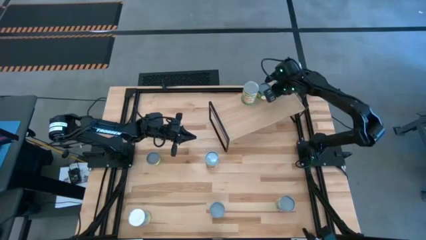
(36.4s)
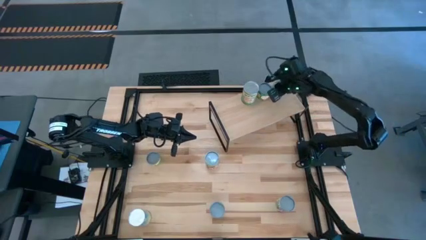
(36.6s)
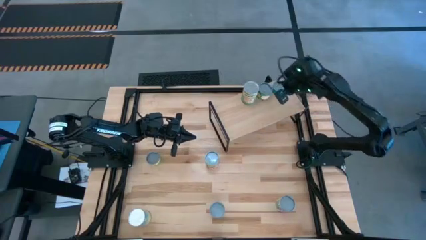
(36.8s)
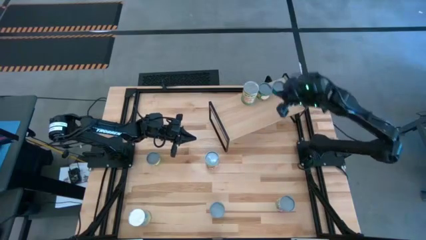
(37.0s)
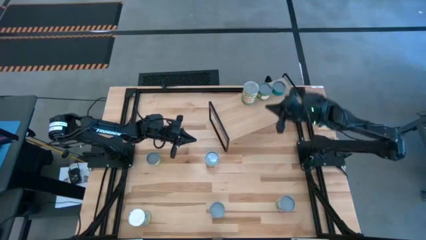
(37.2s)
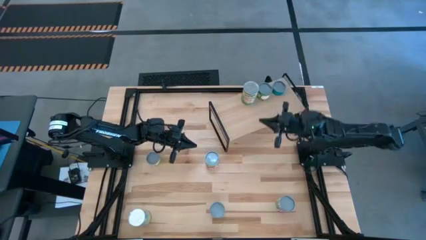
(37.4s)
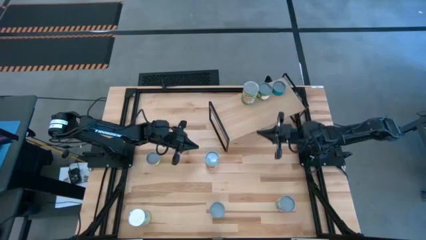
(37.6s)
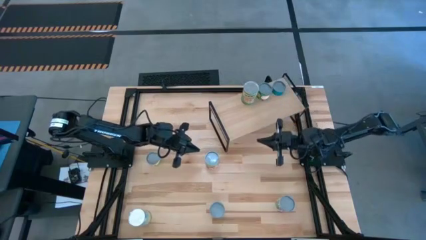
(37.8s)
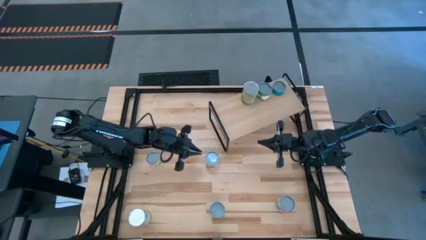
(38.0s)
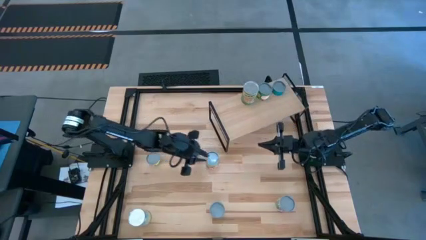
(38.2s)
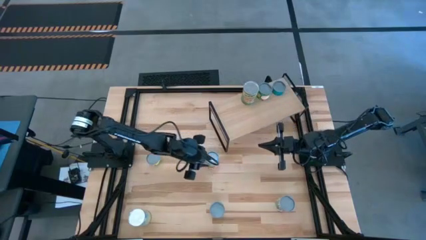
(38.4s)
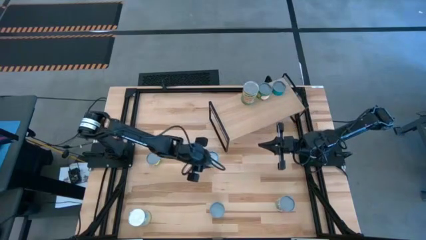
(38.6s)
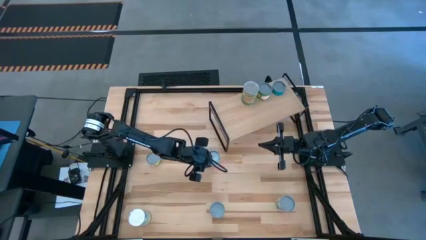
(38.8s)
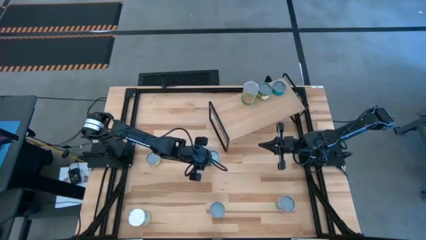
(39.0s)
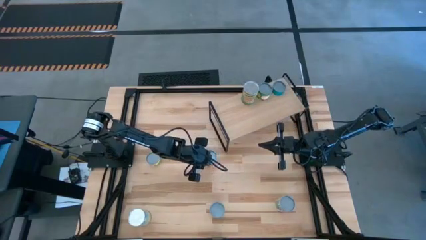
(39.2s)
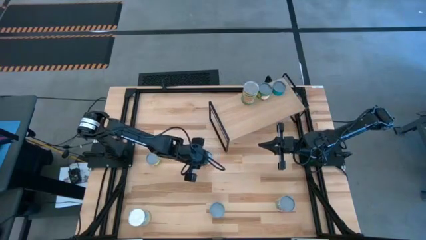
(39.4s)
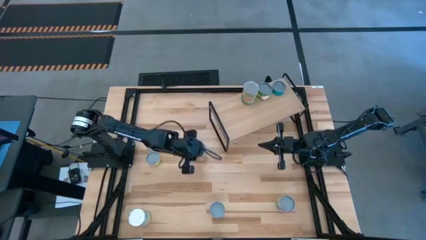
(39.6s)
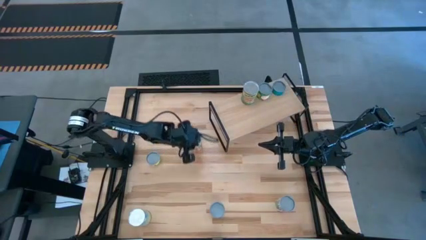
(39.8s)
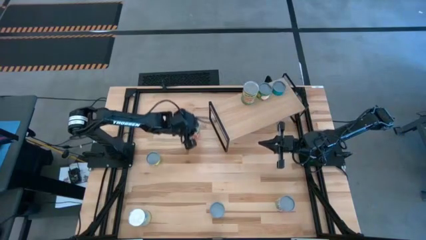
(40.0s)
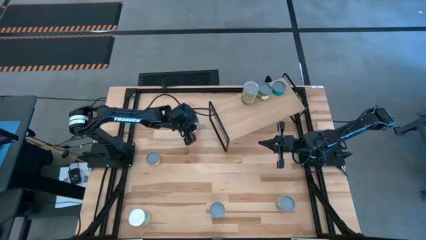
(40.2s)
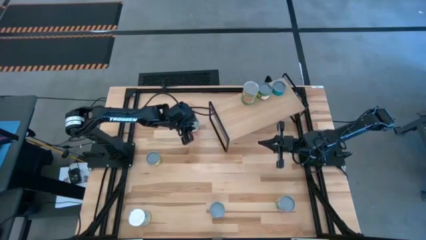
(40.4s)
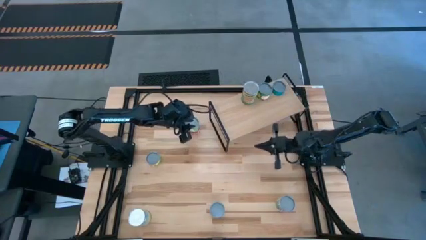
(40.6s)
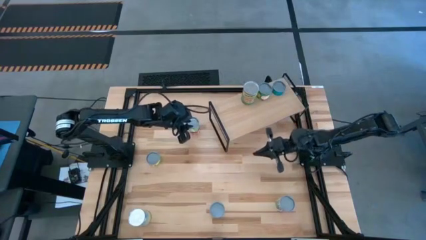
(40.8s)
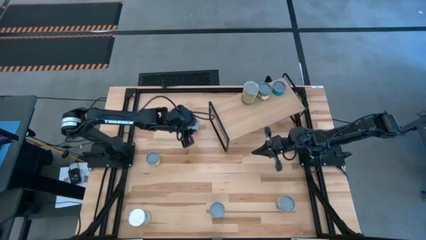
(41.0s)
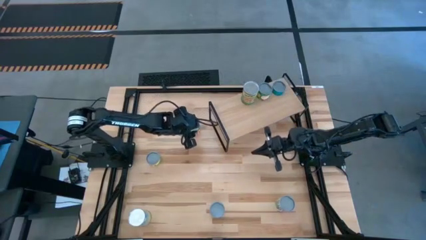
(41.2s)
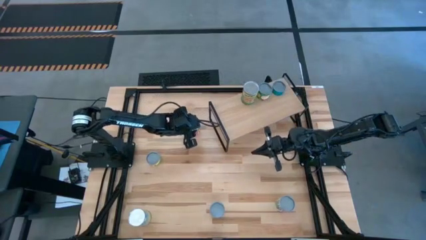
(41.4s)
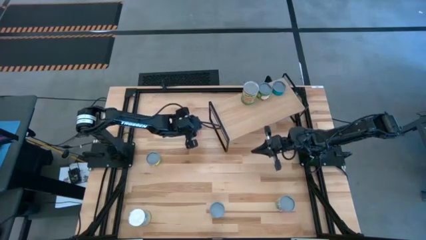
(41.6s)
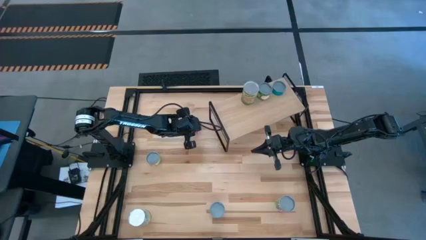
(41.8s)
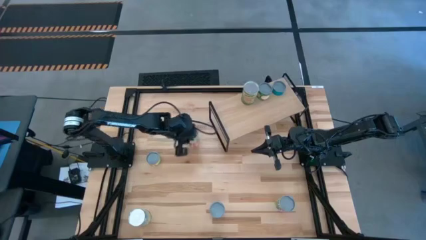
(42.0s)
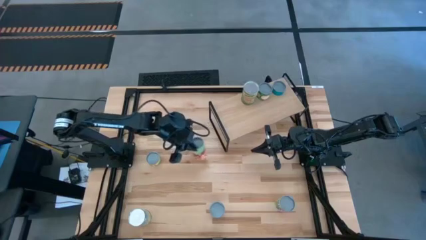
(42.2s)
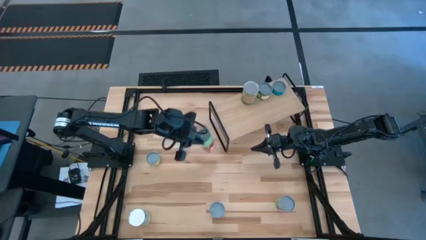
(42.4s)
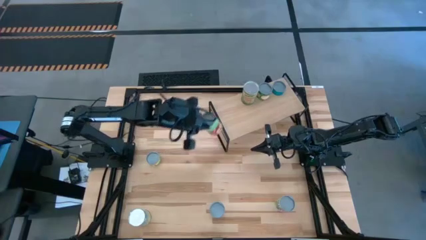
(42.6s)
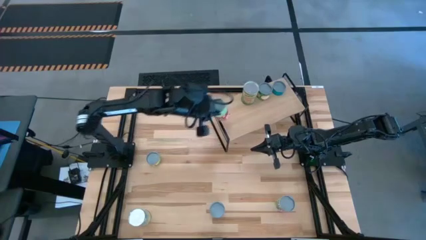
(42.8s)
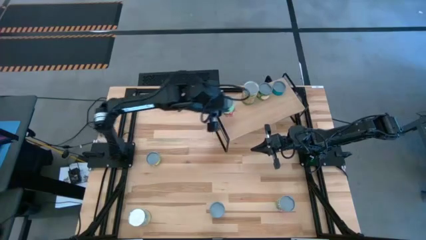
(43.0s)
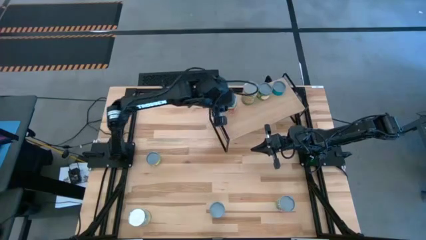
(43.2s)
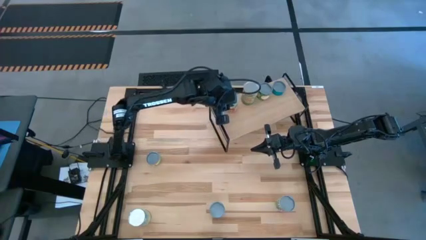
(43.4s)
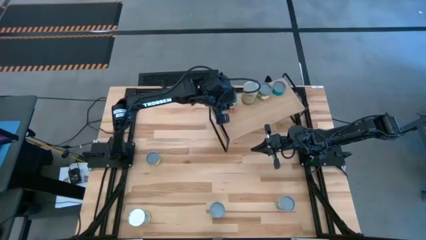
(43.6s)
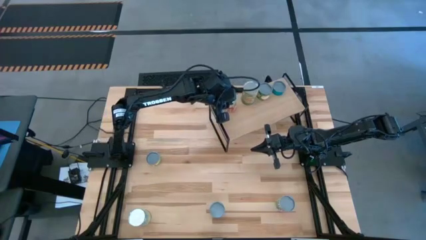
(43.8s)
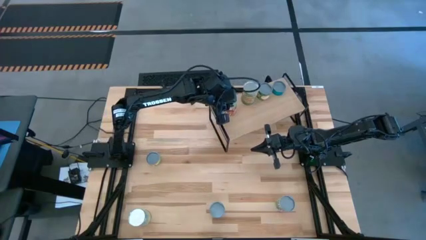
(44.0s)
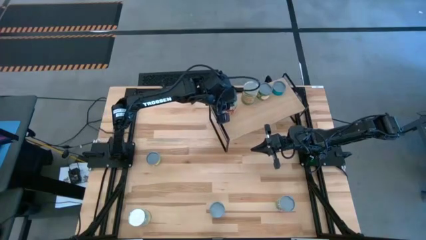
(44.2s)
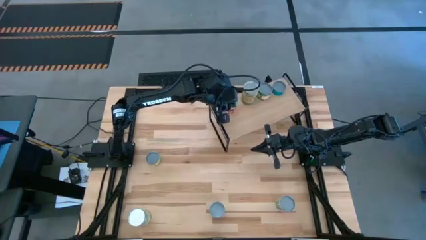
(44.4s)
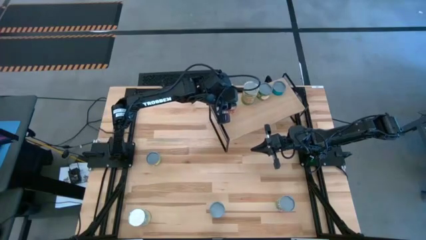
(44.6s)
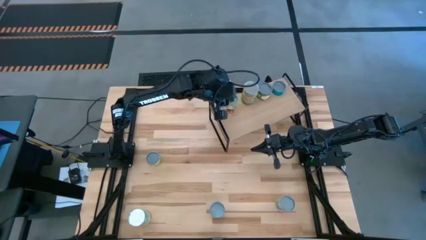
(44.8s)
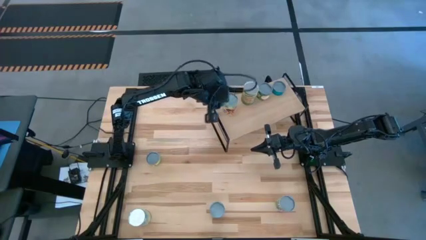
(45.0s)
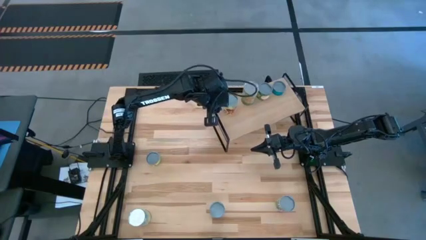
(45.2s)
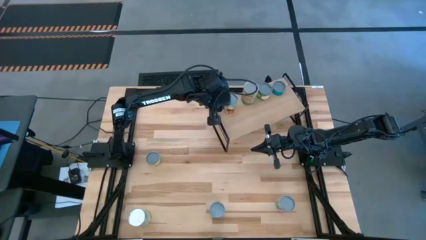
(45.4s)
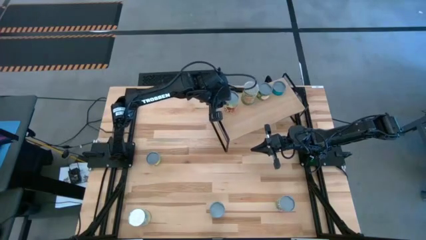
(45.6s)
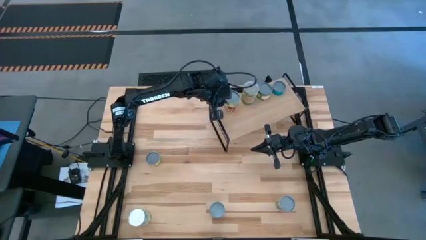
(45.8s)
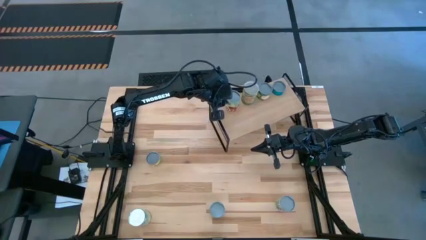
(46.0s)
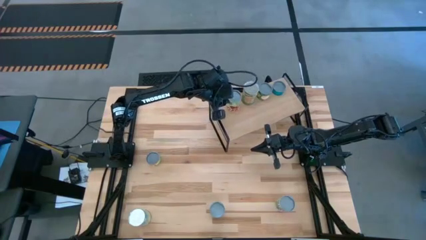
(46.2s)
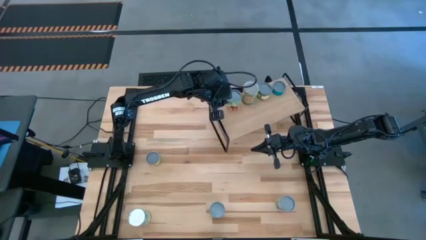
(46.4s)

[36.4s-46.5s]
Task: Pick and place cans onto a shelf
Put the canned spaghetti sauce on the shelf

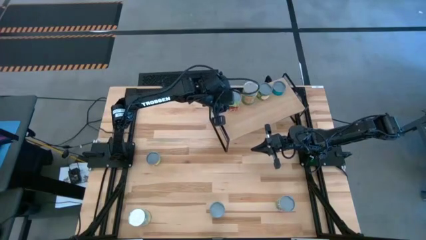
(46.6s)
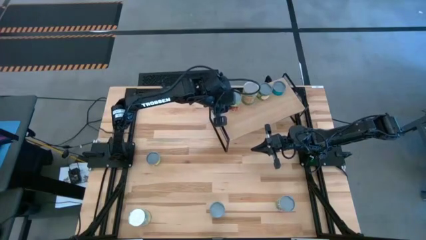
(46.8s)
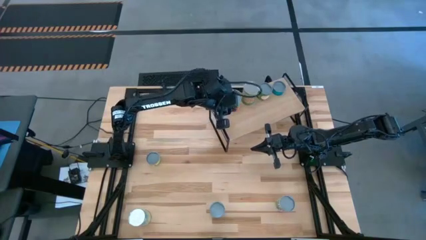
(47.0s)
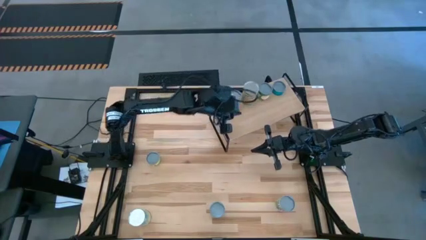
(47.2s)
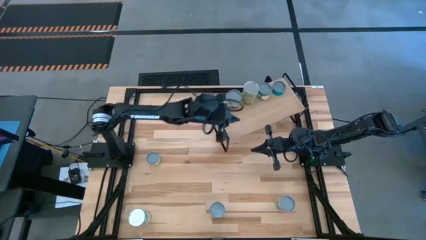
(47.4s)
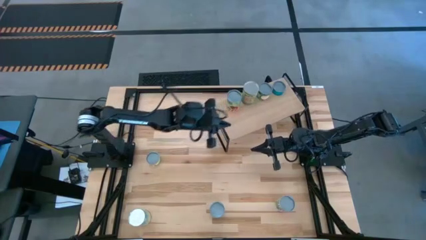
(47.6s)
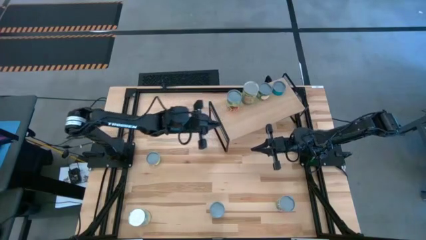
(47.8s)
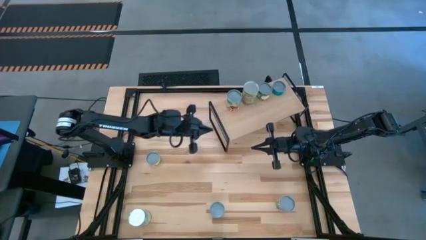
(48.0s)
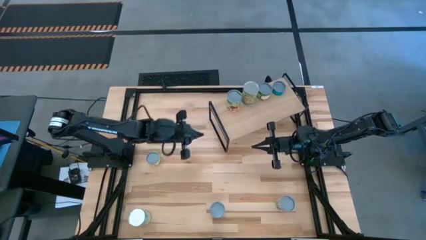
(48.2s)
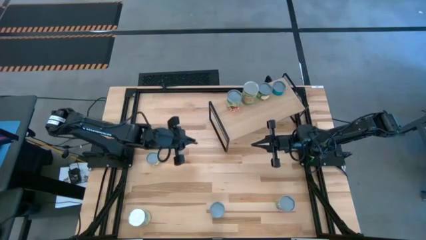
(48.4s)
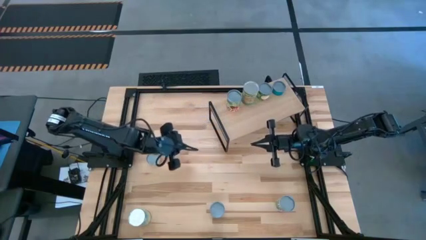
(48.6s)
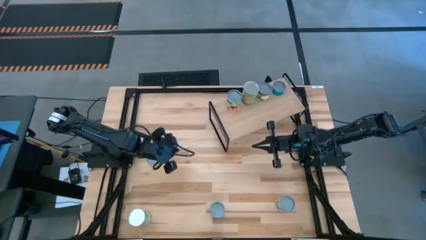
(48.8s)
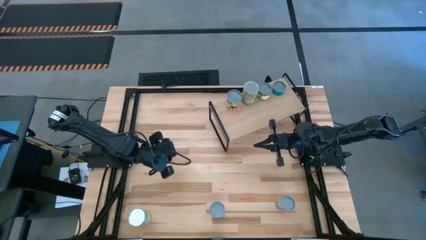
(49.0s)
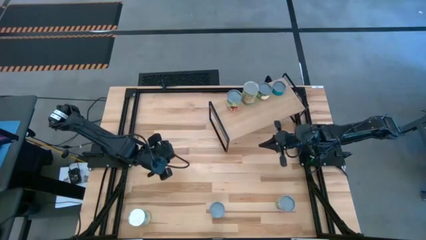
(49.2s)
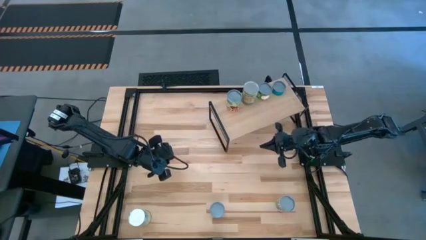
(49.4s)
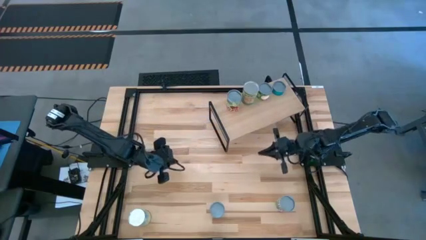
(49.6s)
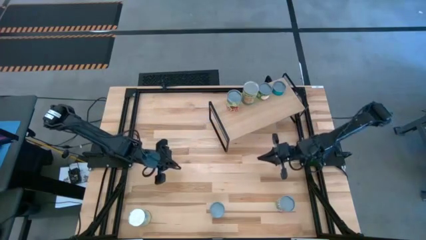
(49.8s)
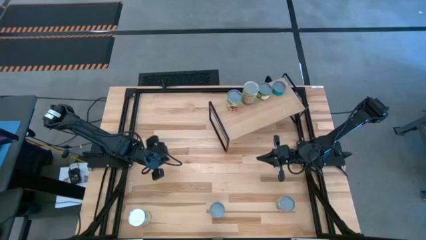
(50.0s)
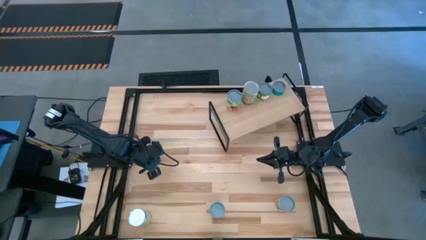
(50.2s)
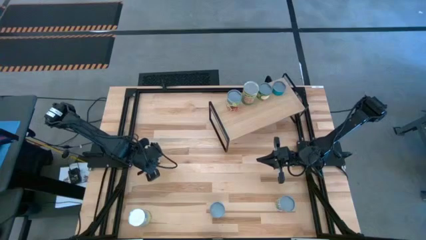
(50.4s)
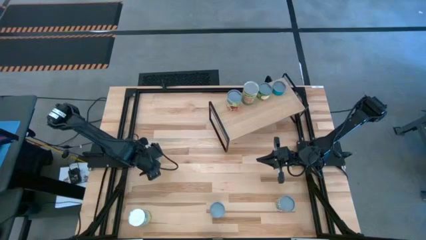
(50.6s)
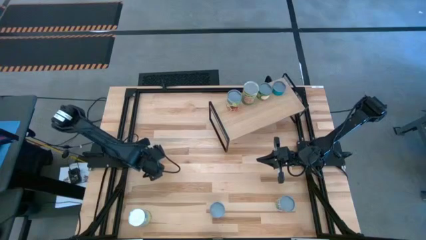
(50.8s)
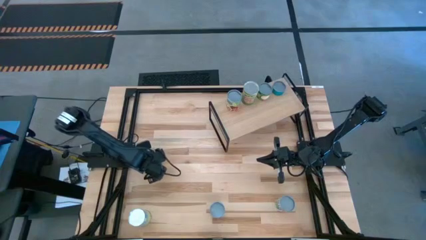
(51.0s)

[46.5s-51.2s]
Put the canned mushrooms on the shelf
